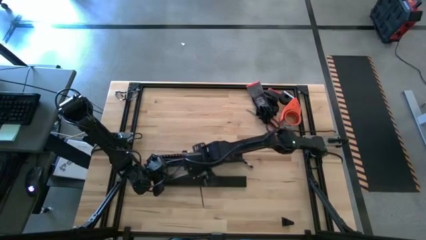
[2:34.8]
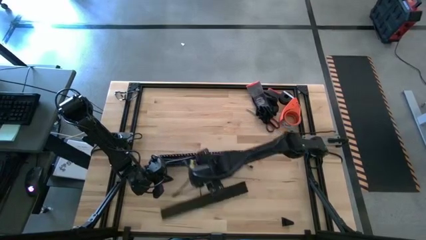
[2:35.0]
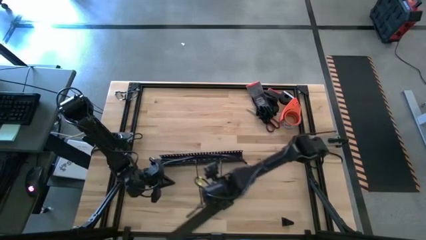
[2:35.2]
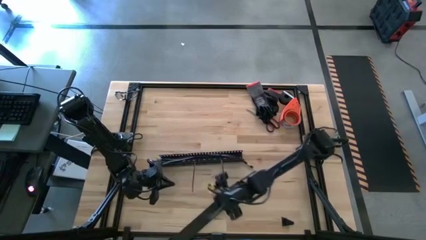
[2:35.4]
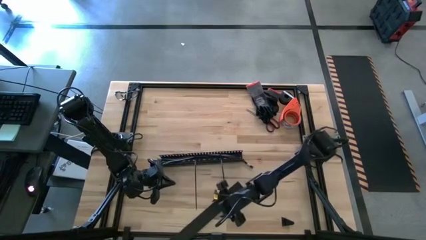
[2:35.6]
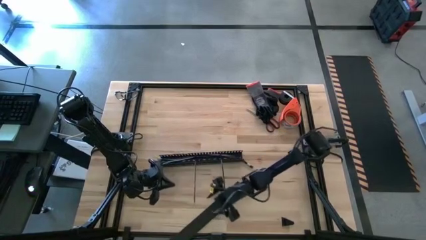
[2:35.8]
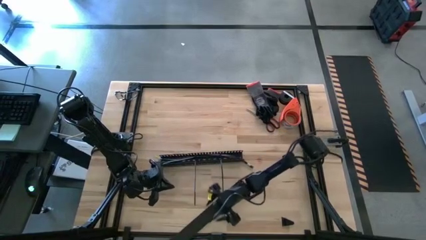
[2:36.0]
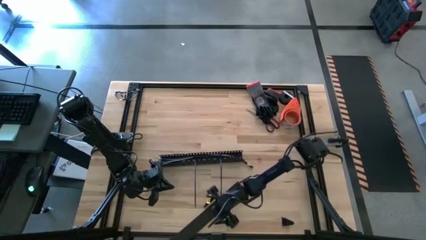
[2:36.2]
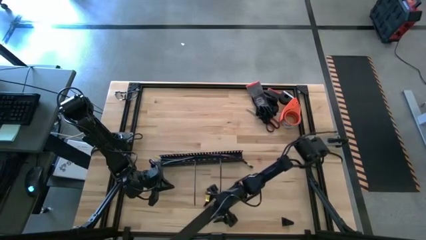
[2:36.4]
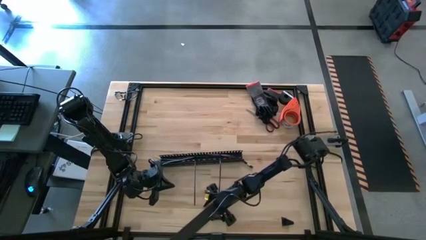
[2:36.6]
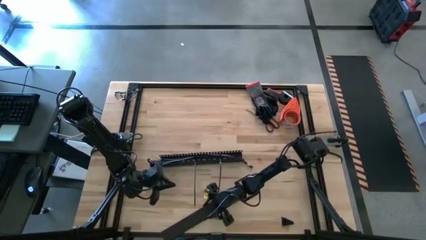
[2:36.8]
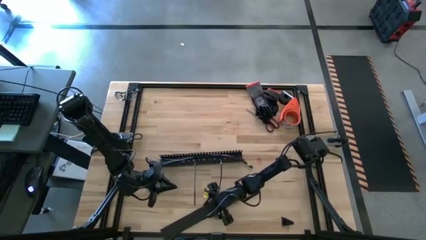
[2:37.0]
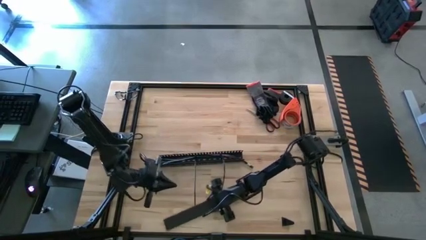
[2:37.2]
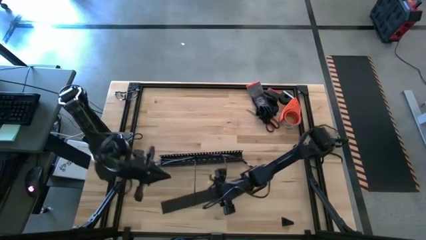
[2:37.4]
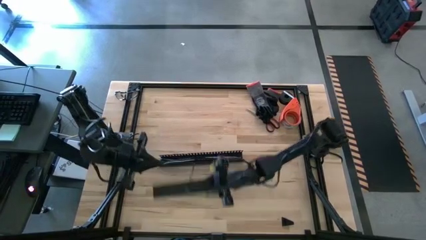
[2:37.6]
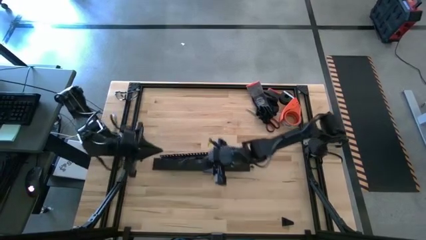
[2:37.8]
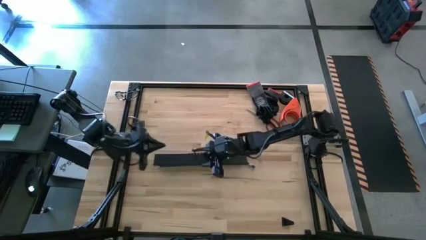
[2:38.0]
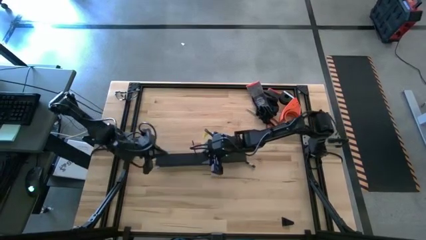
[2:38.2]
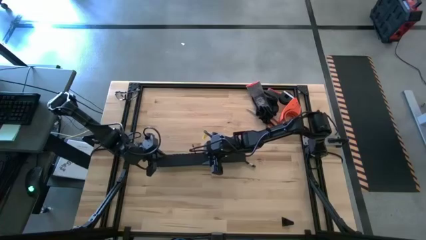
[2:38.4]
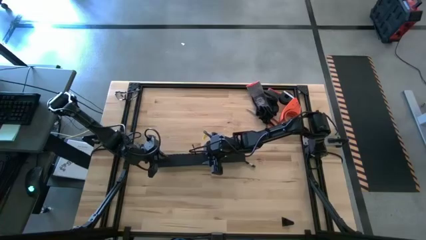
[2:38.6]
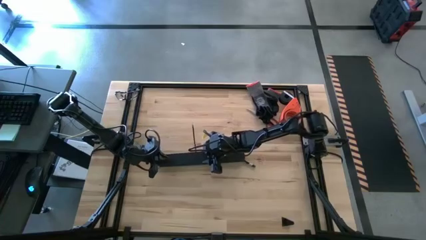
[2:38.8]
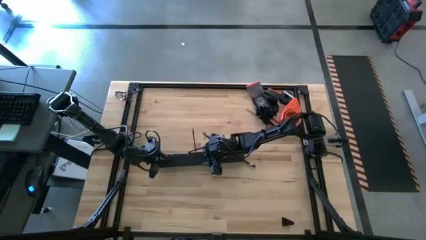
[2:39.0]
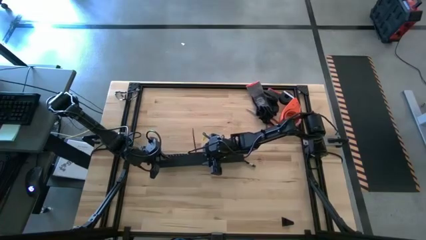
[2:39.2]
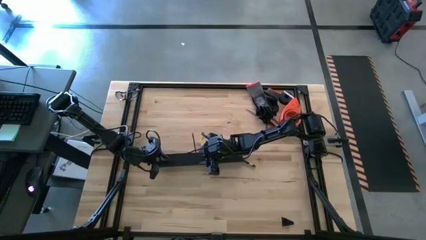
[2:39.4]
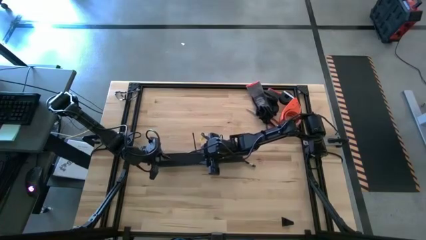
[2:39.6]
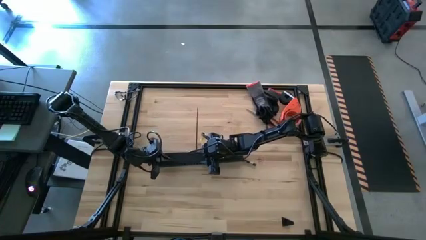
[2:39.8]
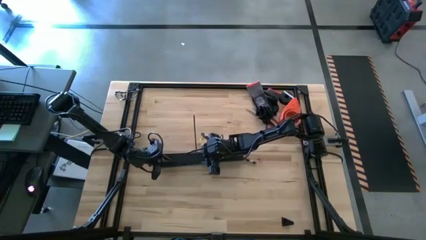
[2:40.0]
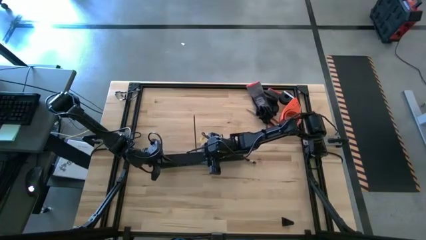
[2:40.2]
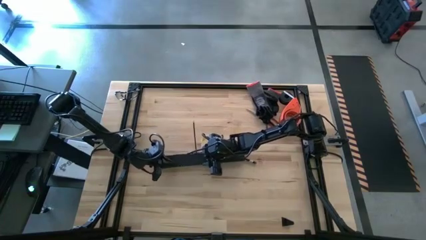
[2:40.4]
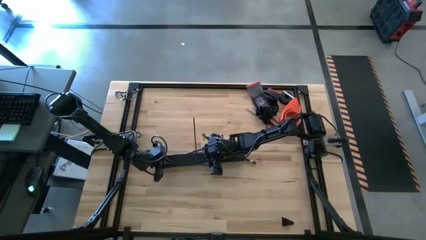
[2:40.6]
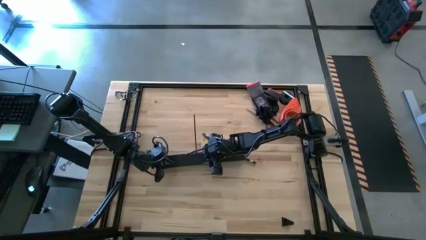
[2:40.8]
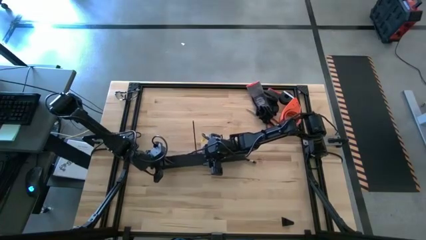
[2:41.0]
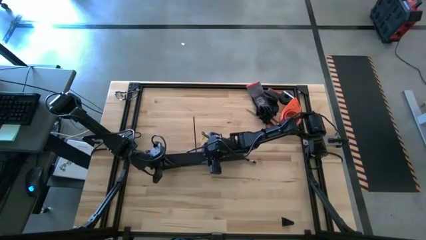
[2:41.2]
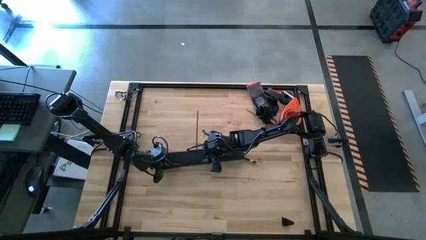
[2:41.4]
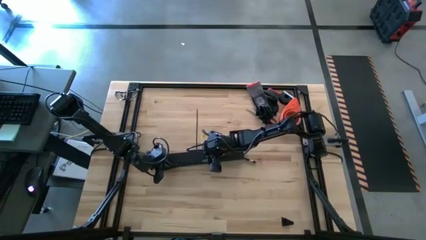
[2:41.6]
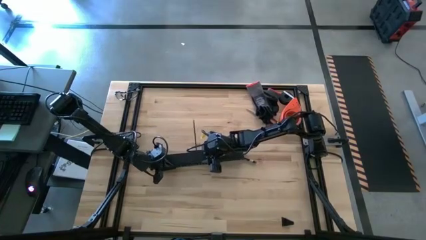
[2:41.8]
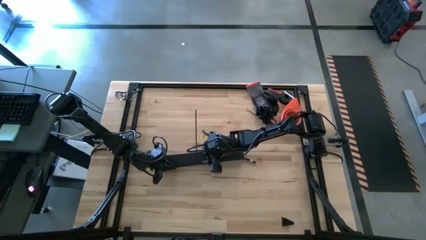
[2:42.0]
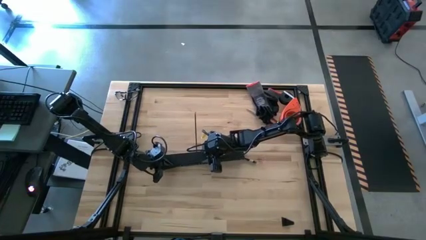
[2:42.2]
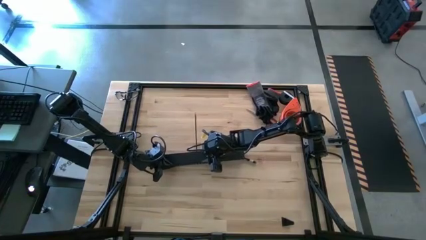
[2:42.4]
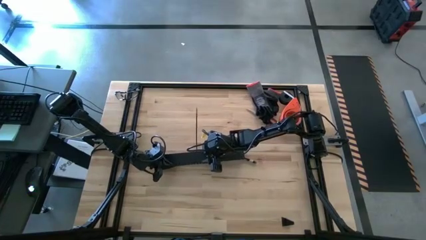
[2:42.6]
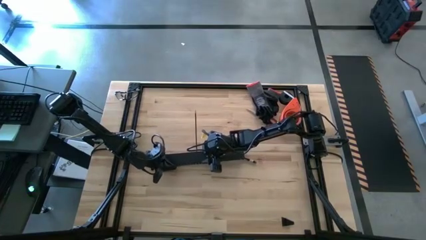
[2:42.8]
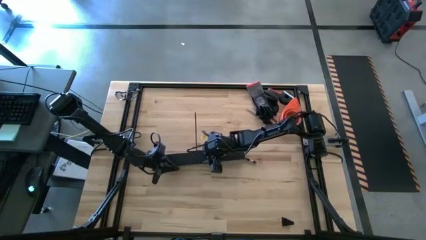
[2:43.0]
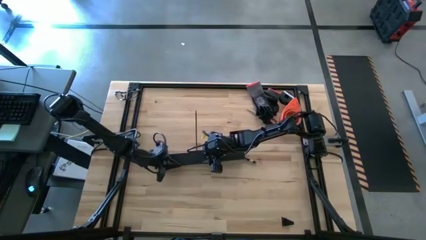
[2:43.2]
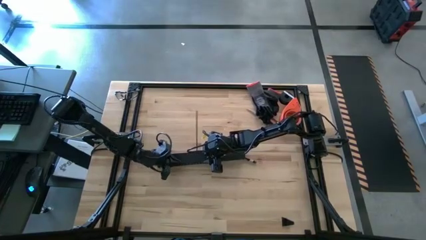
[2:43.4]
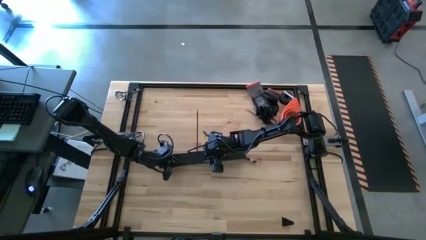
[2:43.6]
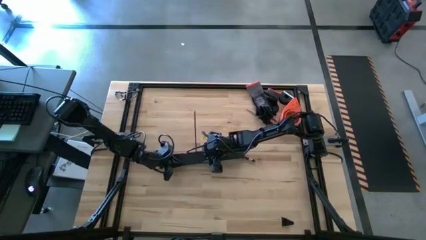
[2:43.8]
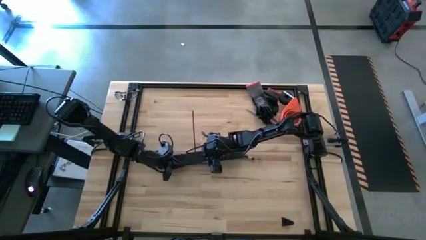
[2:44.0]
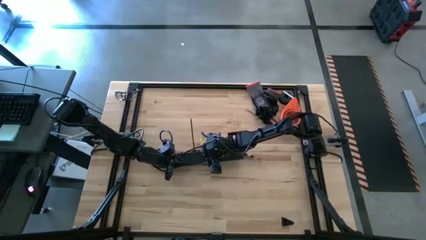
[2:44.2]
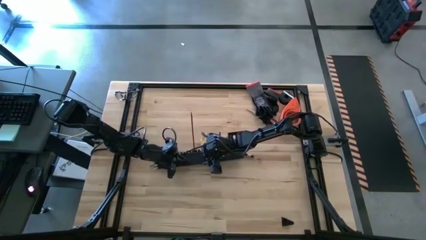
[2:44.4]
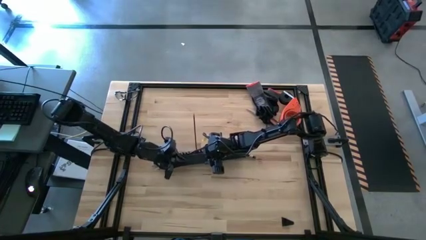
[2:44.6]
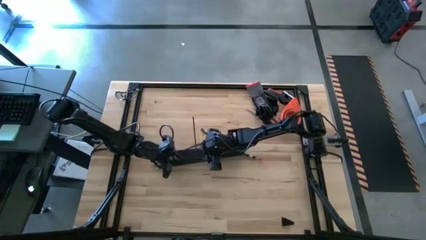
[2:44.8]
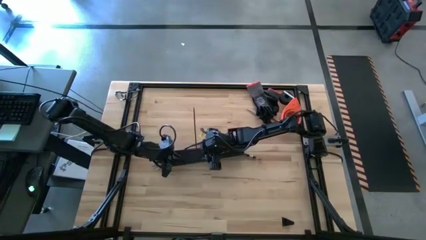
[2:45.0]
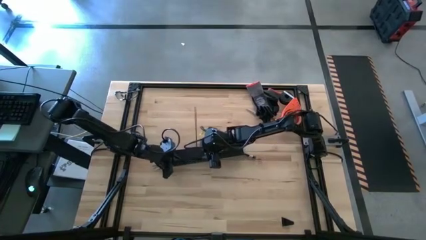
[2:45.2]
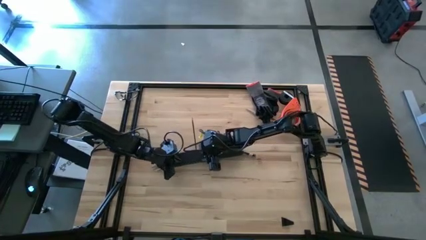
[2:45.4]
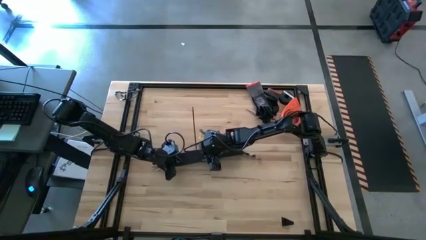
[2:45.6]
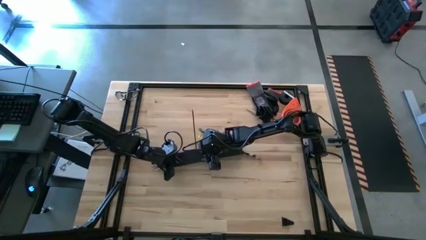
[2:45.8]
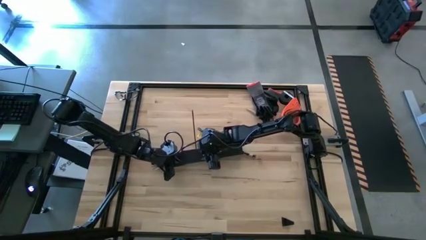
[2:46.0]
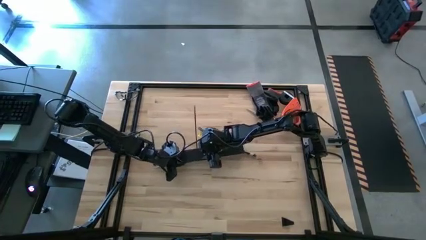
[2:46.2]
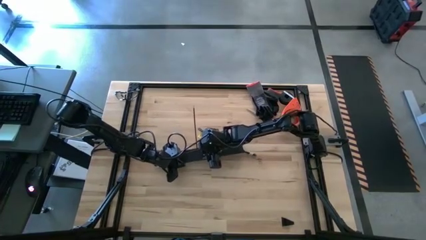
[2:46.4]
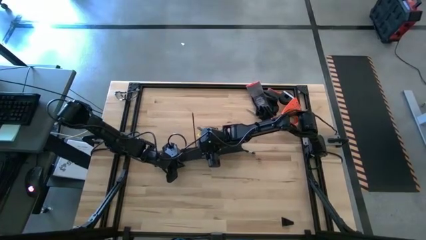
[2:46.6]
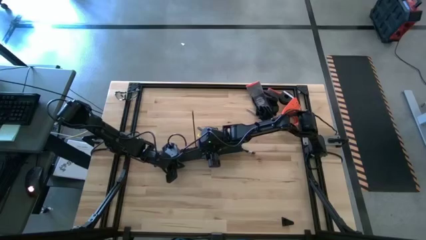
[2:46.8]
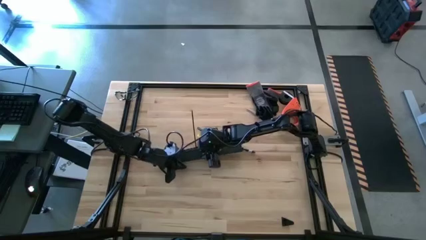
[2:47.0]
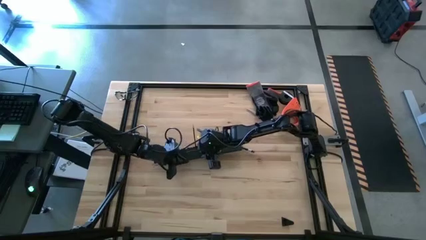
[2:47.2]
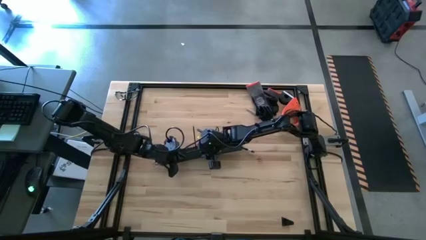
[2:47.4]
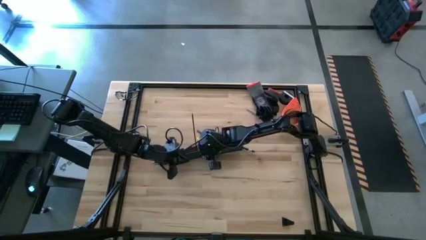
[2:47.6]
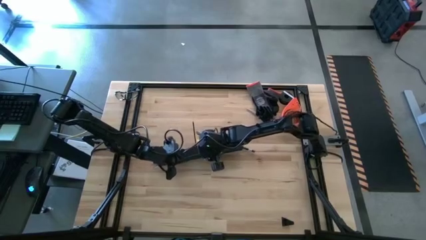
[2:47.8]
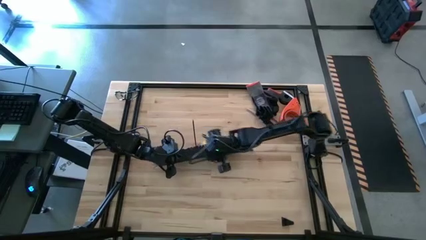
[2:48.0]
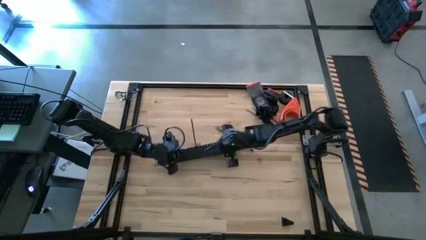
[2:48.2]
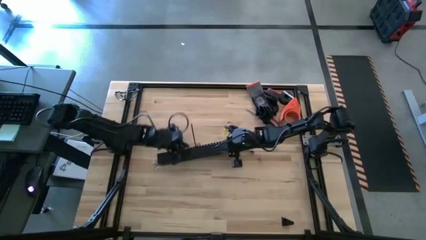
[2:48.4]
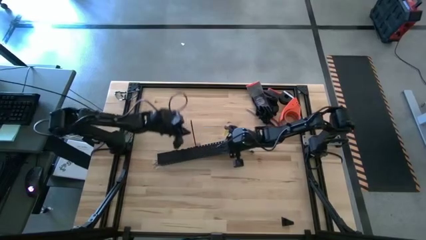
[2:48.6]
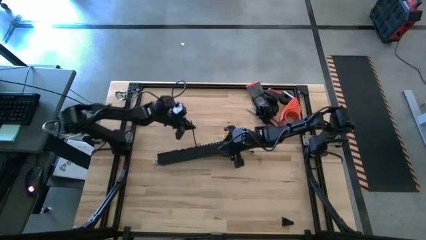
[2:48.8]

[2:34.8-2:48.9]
Task: Ziptie cables
Close the black cable duct

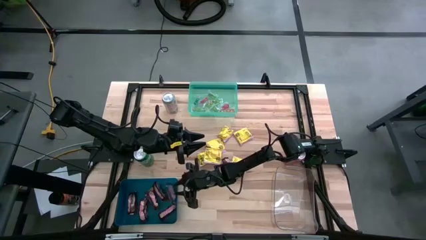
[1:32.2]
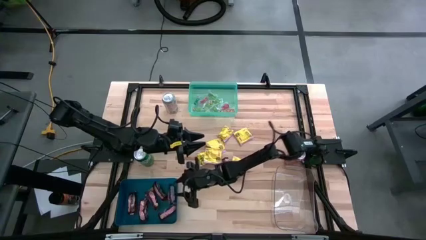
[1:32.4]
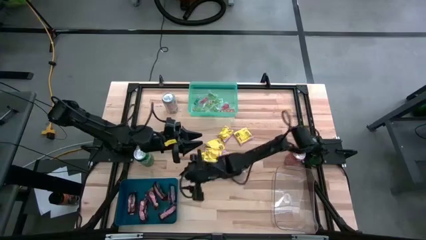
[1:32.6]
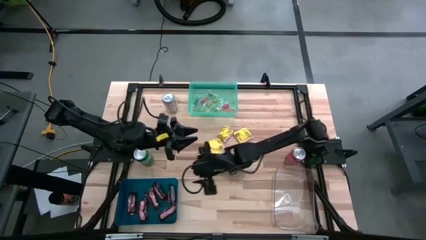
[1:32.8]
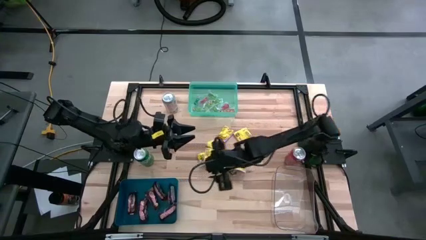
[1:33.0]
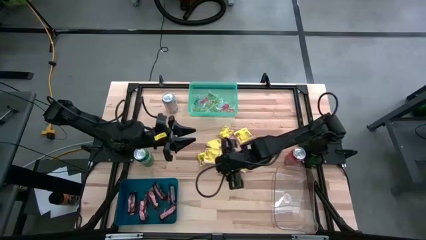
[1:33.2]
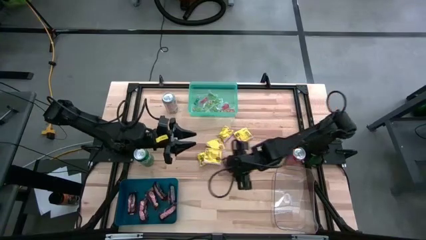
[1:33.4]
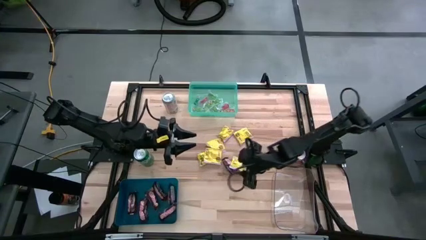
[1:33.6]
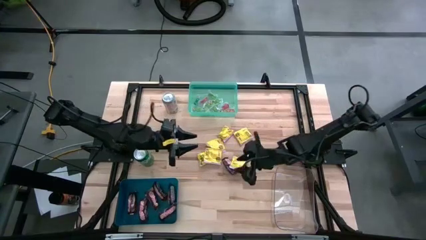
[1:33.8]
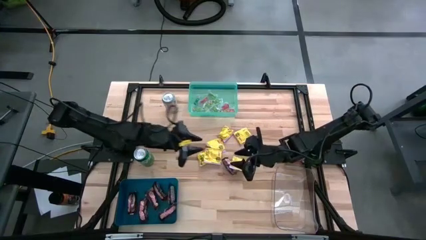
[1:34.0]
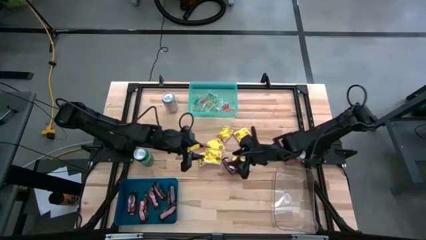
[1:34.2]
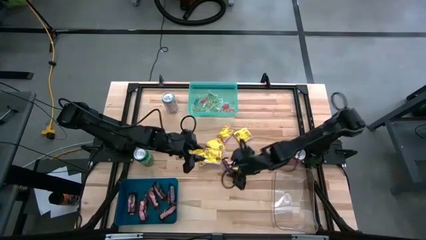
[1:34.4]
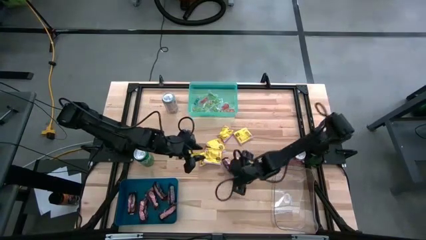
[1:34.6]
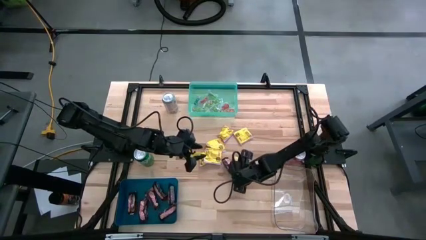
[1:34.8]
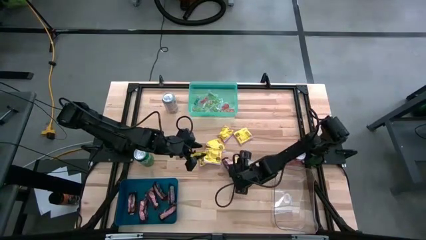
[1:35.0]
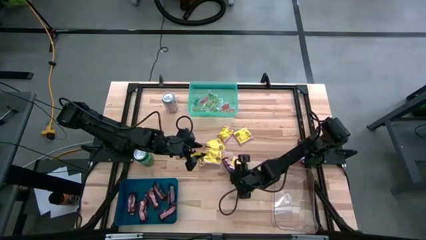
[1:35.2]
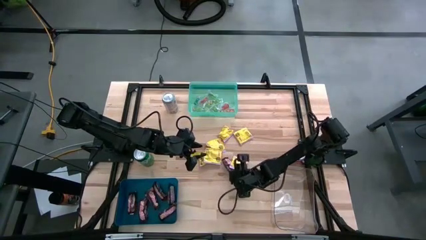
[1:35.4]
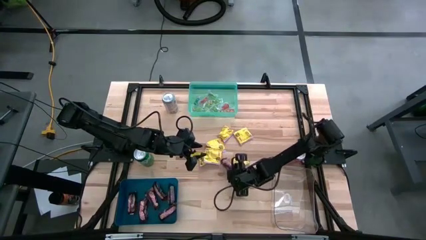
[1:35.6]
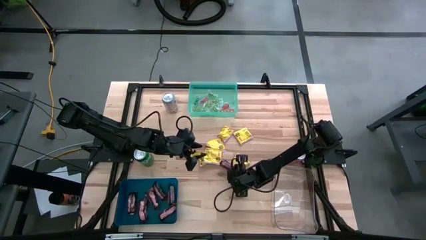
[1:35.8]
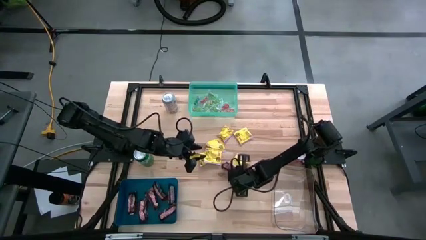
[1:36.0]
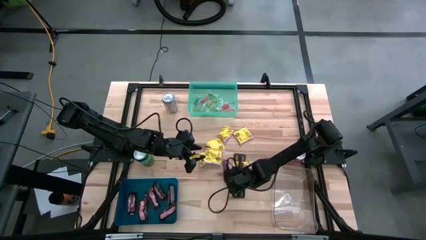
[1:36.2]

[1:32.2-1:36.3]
Task: Sort candy
Put the brown chocolate into the dark blue bin
